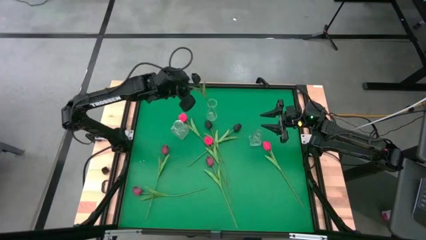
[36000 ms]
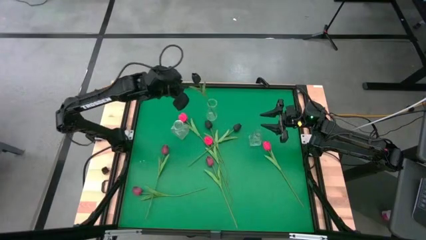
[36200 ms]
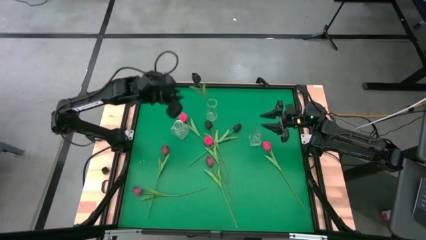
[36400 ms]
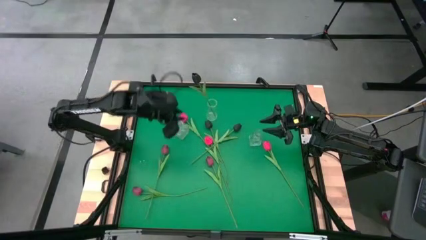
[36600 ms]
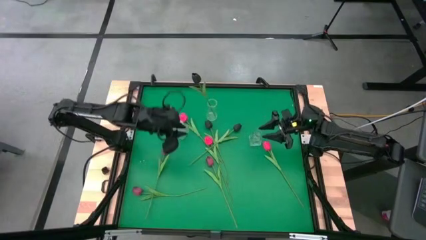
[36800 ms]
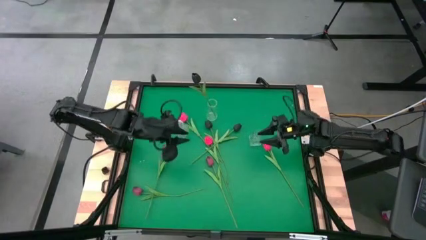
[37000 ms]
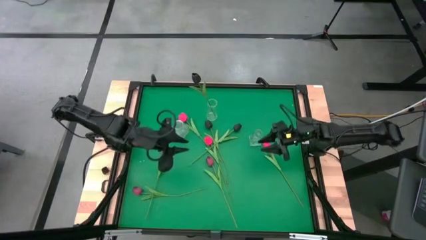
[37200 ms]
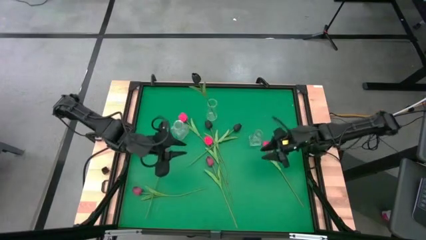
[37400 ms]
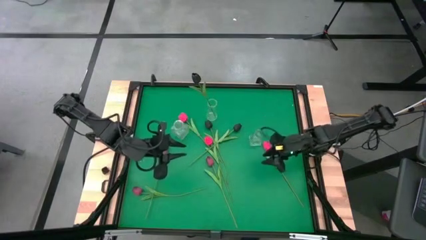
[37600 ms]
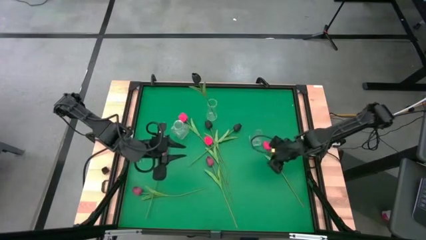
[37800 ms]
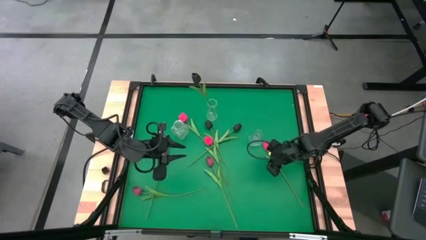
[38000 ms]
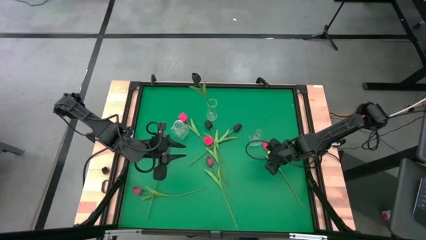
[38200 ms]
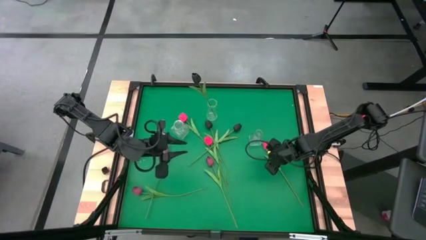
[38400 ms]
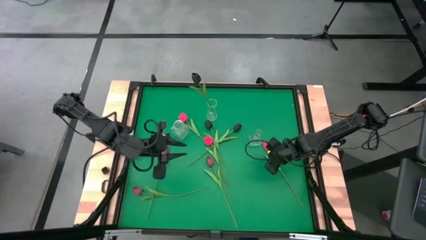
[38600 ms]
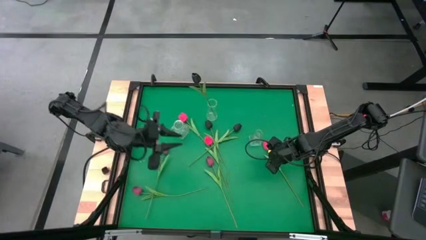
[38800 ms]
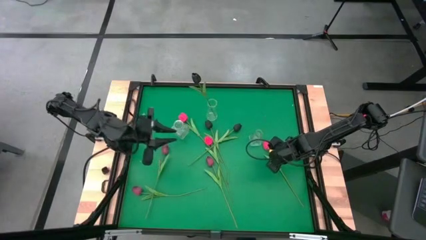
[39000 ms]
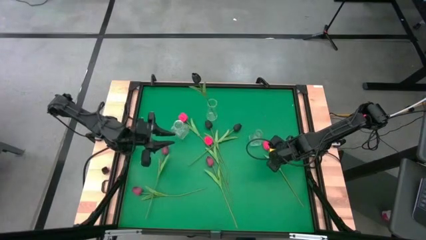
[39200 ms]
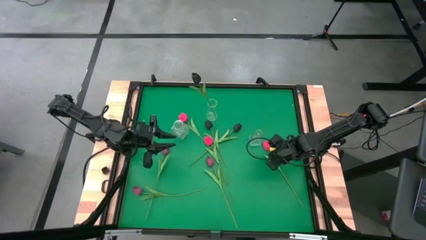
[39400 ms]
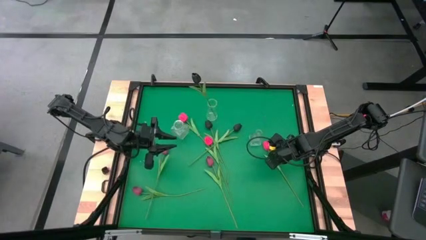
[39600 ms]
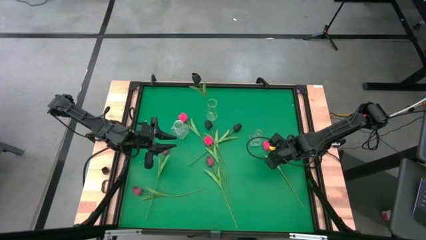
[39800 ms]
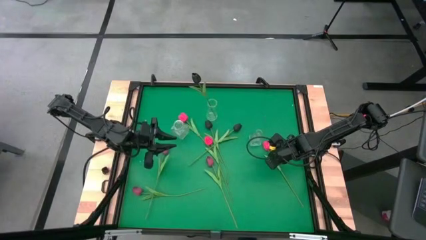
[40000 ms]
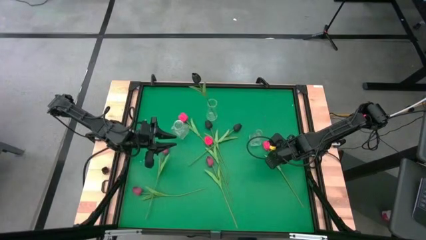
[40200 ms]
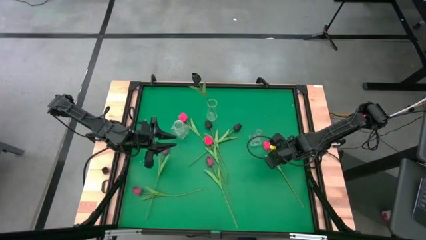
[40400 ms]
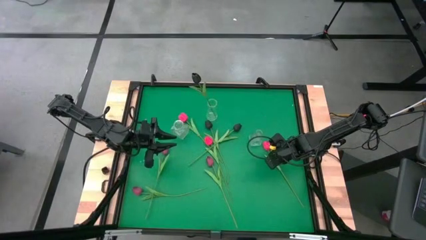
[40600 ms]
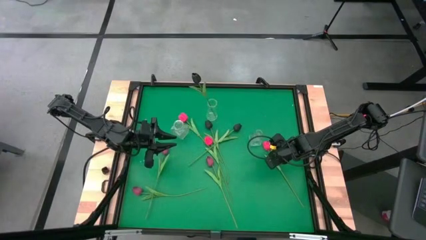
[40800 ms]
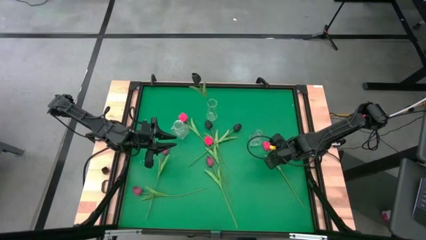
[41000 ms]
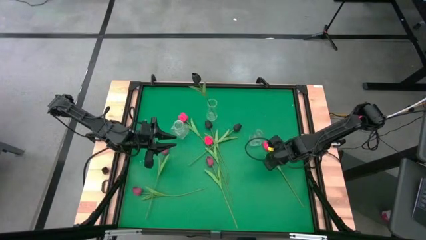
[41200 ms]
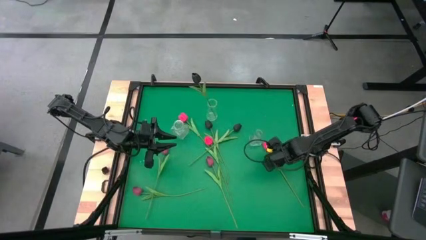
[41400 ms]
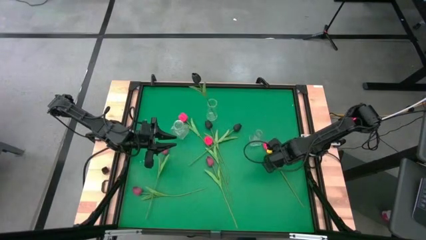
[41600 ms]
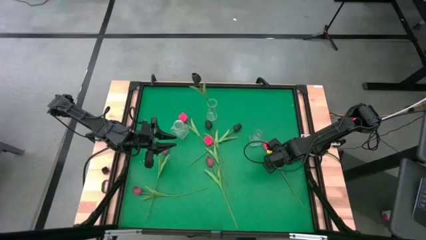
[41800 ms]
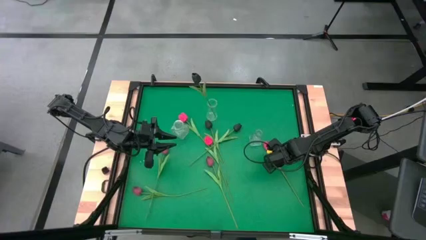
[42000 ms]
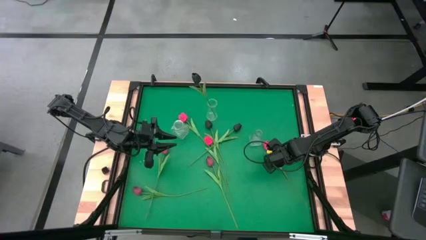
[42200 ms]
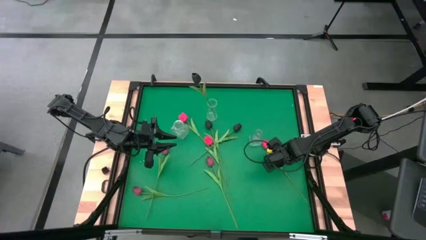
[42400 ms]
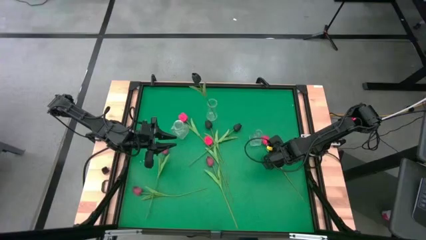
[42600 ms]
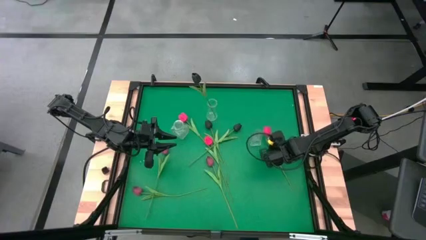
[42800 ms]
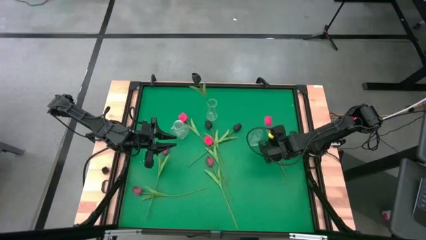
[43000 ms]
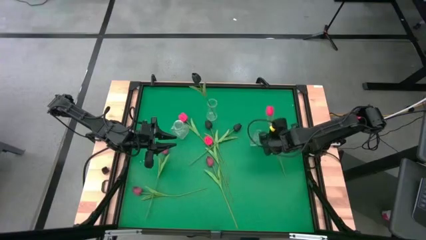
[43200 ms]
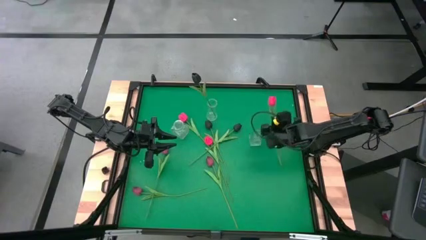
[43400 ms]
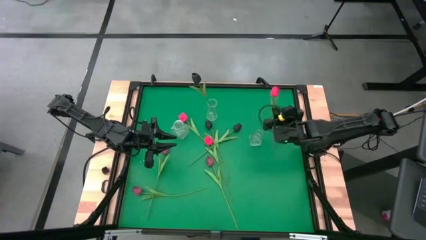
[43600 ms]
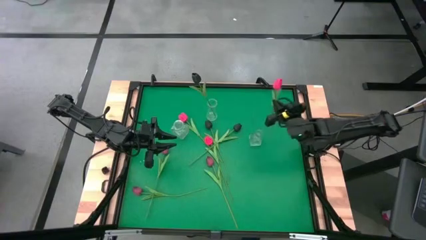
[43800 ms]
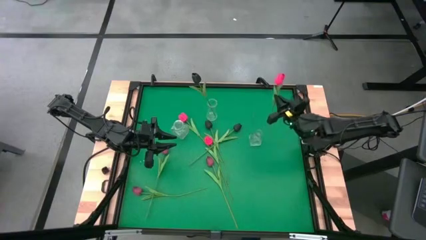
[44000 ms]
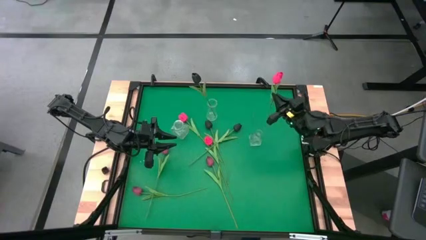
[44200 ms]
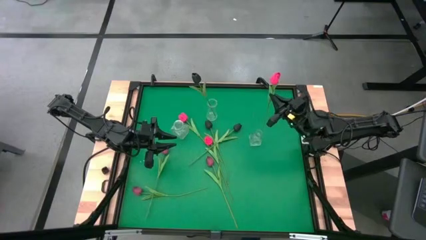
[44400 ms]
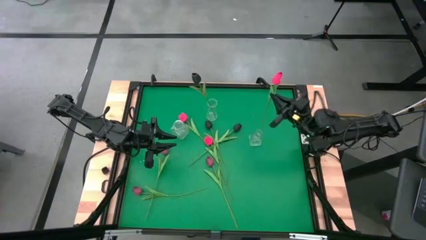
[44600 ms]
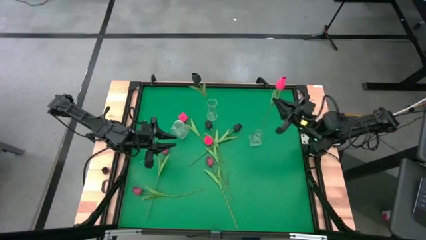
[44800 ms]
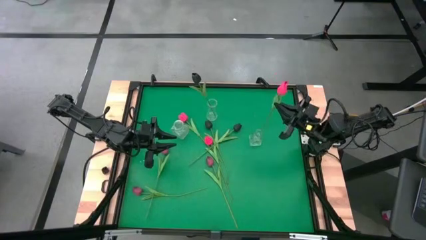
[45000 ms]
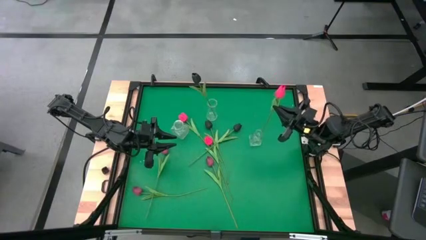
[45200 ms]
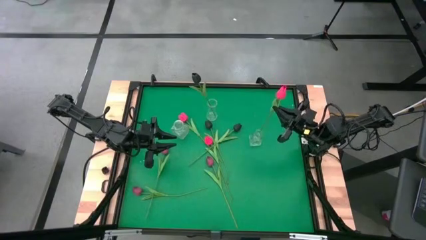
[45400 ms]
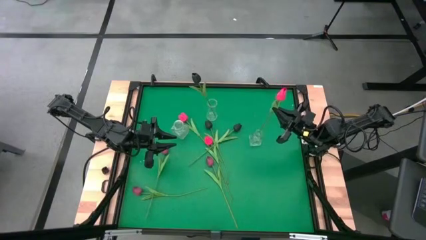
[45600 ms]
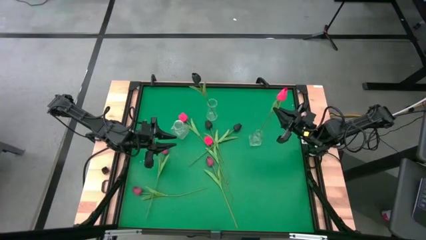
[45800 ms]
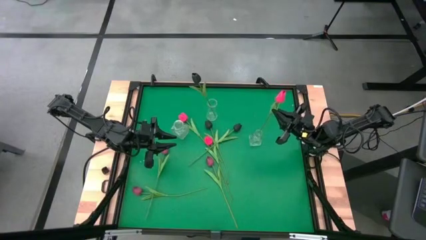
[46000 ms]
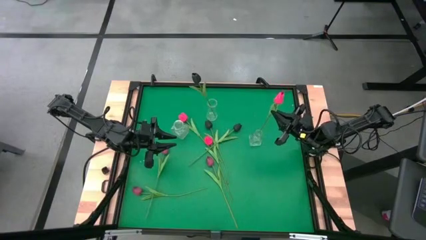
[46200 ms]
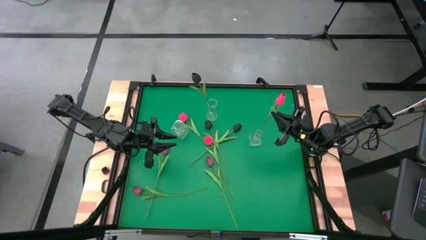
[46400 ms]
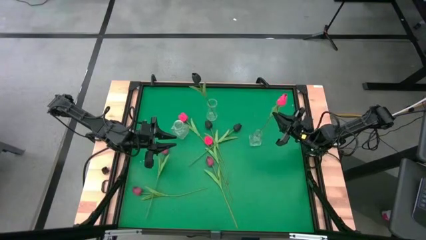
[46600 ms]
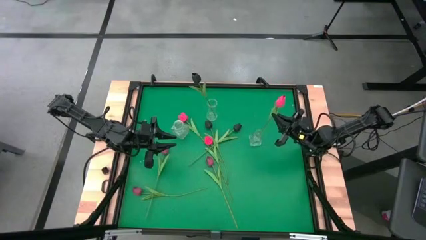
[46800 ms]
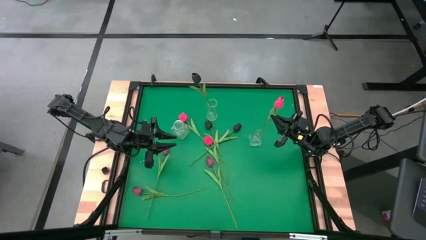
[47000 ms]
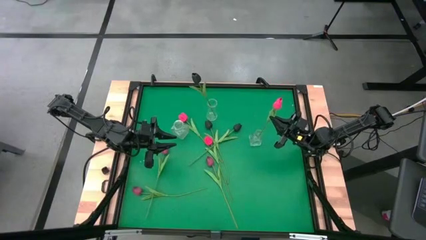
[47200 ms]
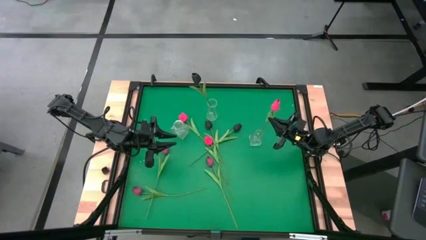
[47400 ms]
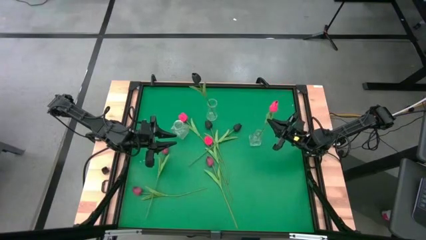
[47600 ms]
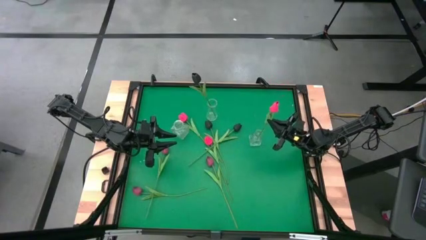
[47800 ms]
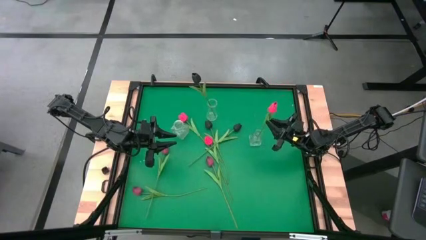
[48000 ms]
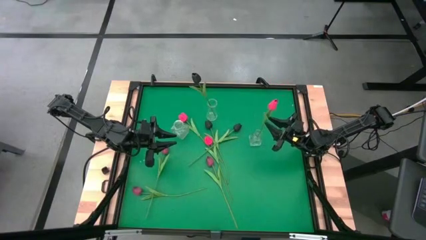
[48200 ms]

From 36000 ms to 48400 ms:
Task: Sort flowers into vase by color
Put the right pink tulip into the bottom right transparent vase
